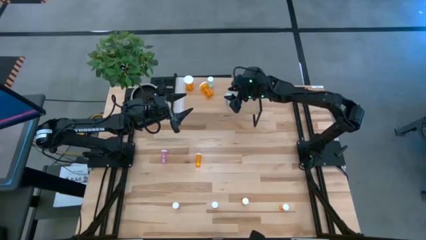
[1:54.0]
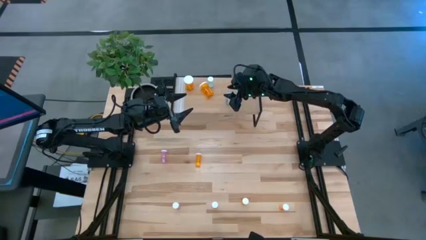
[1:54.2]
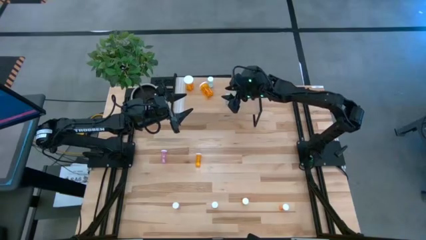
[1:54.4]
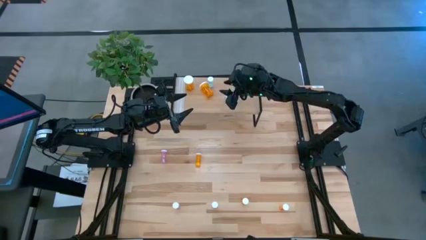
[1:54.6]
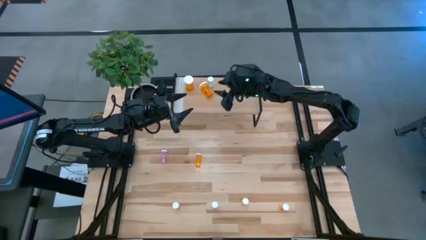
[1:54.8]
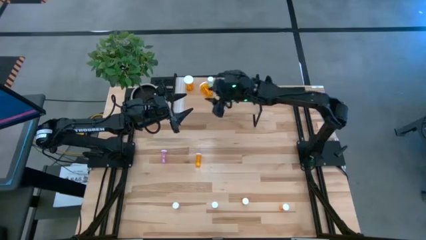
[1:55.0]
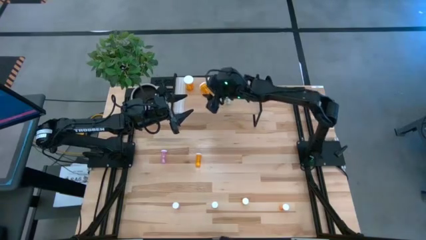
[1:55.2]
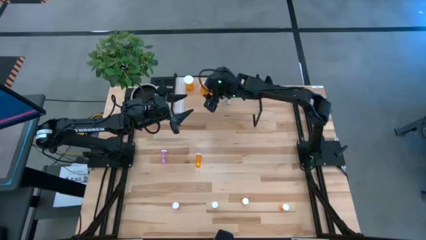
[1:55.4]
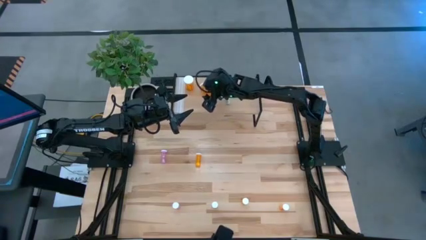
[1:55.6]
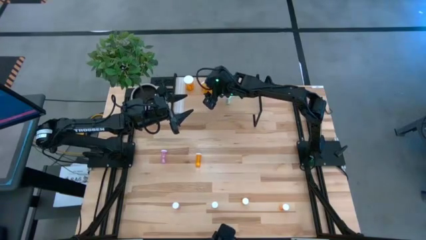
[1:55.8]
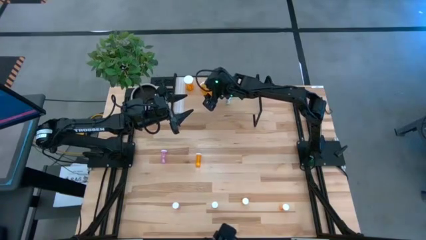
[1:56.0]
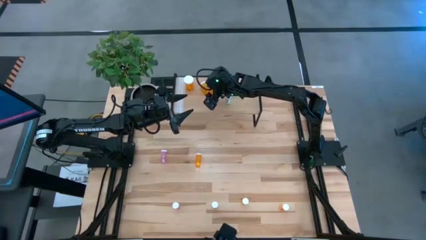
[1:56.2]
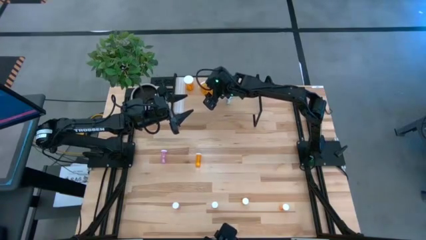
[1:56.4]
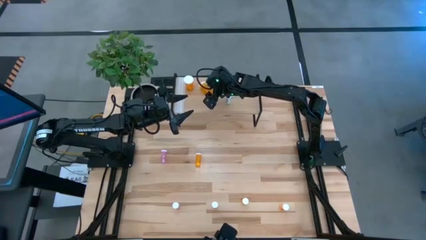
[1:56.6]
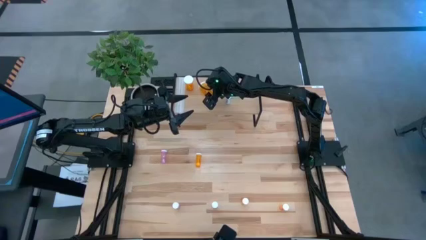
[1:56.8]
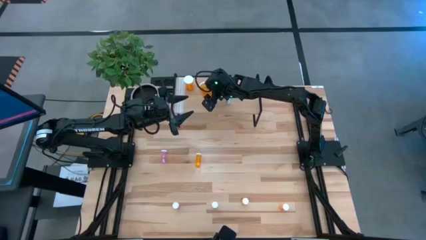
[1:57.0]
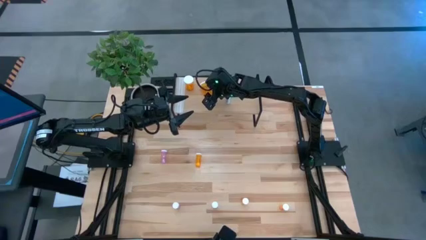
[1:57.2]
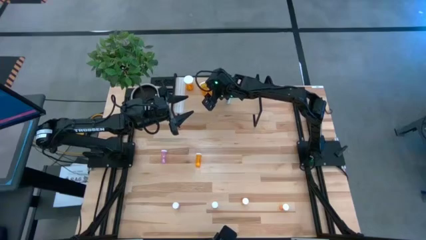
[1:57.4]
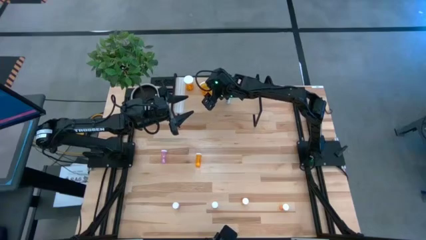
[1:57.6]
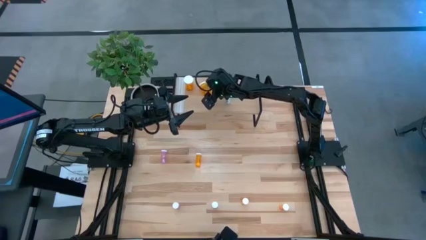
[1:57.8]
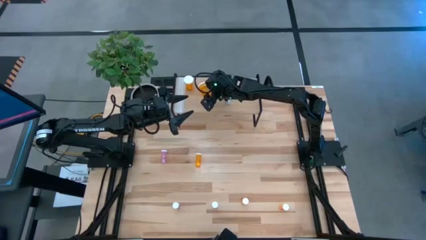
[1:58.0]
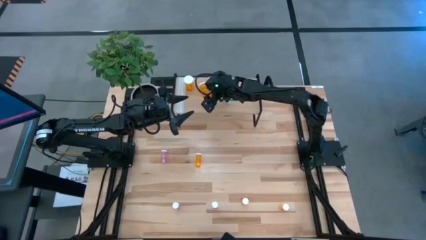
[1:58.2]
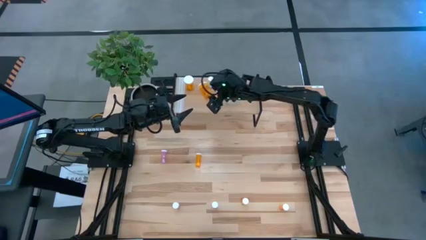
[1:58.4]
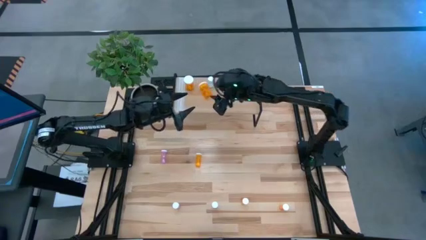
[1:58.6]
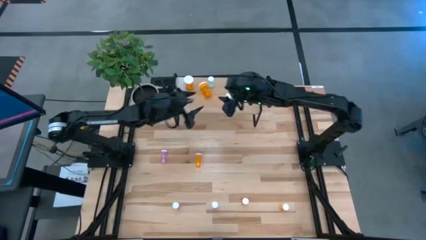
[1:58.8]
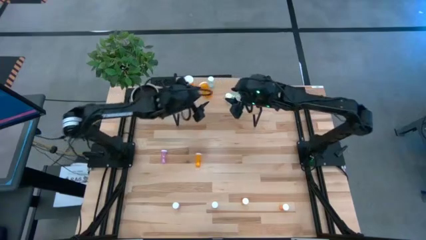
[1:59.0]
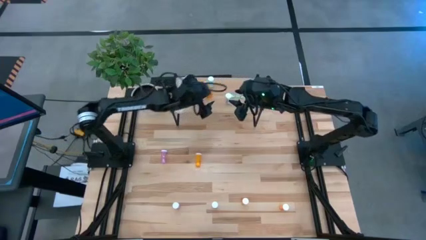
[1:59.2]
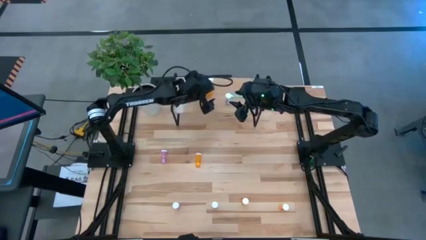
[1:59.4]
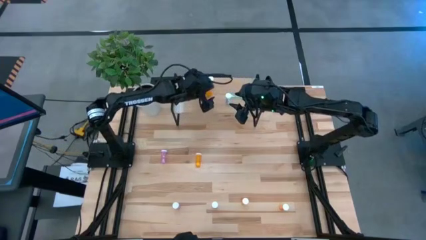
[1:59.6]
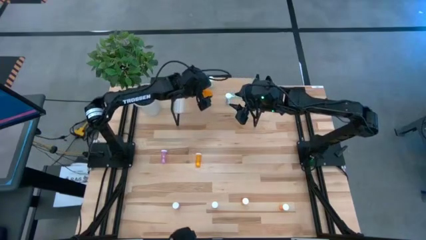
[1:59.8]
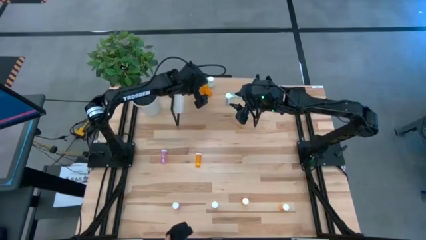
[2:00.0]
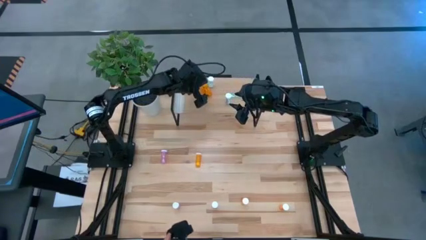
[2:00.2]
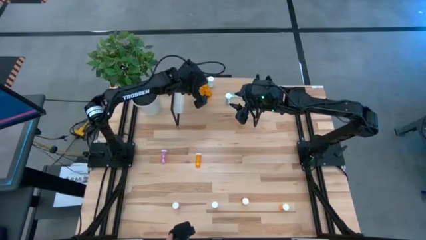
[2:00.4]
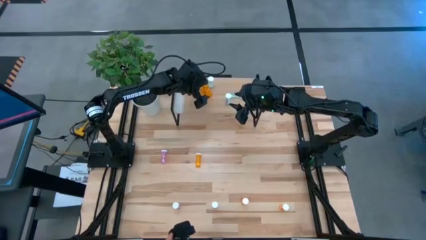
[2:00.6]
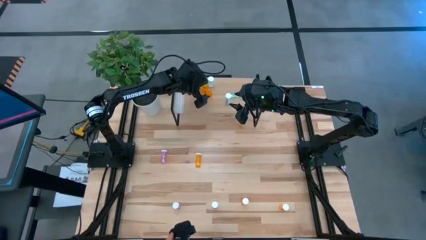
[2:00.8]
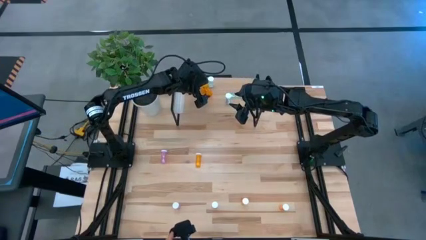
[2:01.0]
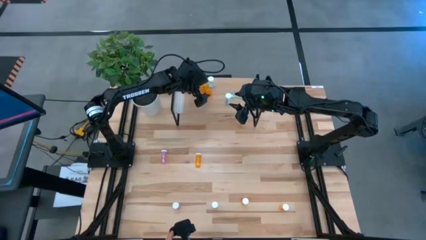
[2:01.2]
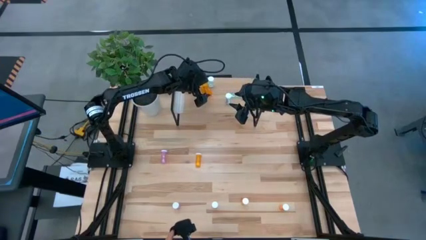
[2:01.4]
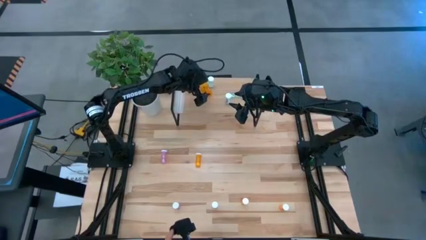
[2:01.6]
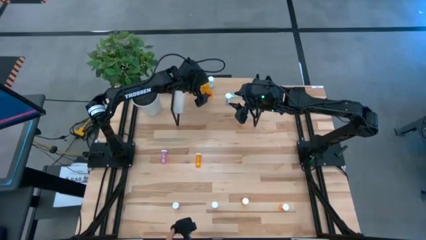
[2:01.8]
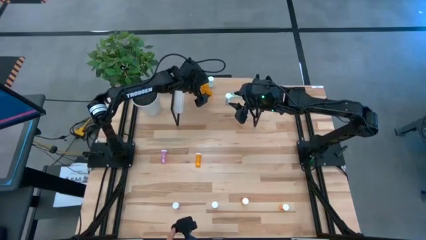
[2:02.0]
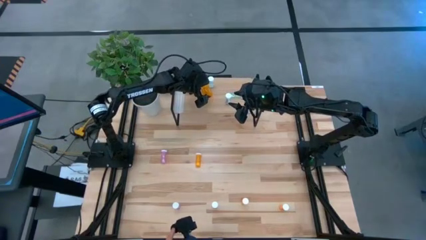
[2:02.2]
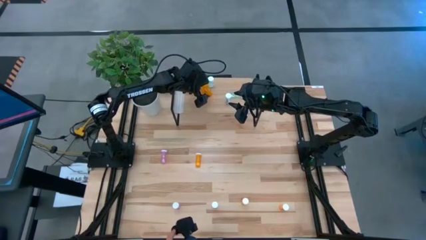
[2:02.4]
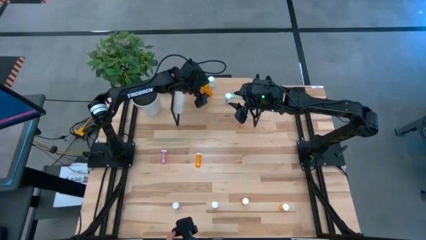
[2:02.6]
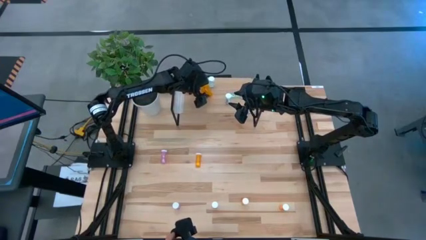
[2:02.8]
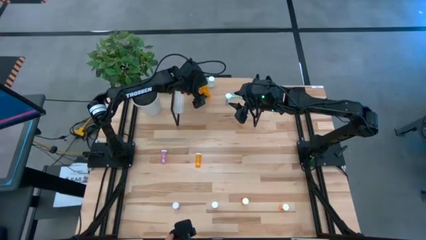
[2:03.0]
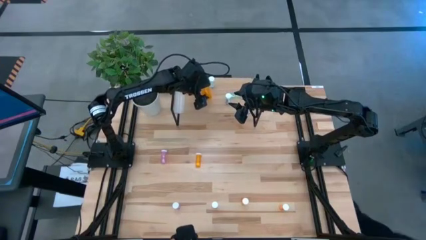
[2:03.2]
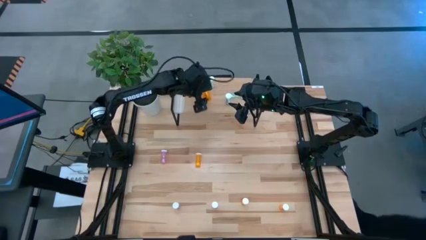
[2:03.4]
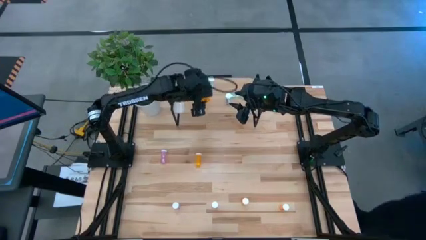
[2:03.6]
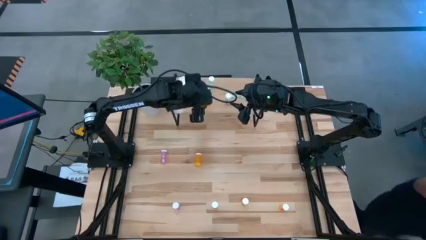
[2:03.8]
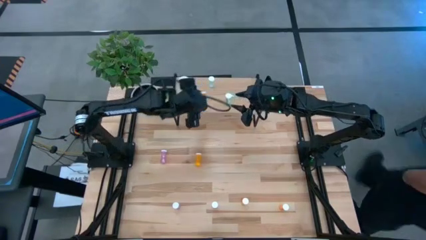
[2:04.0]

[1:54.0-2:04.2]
Task: Pick and place medicine bottles onto shelf by color
Adjust the large orange pill bottle on the shelf

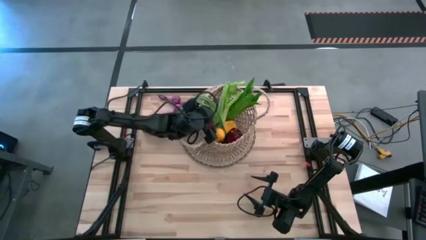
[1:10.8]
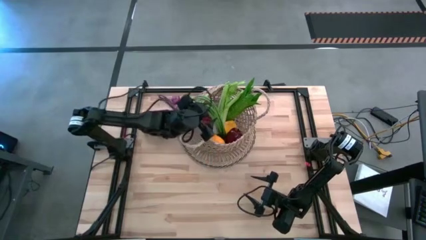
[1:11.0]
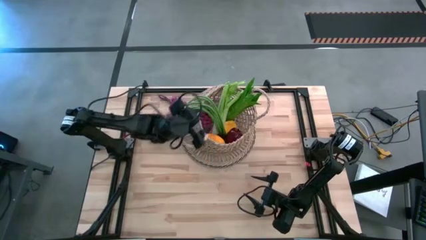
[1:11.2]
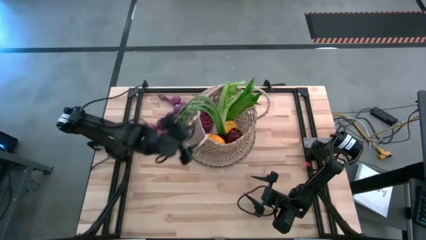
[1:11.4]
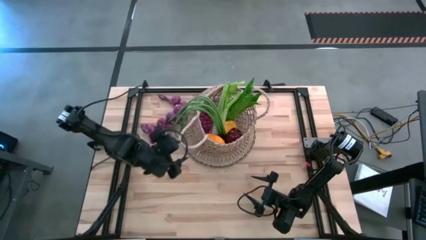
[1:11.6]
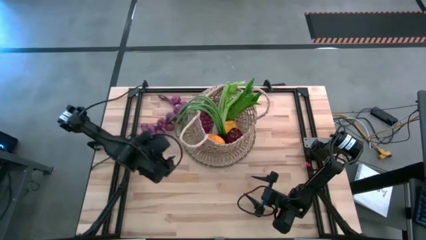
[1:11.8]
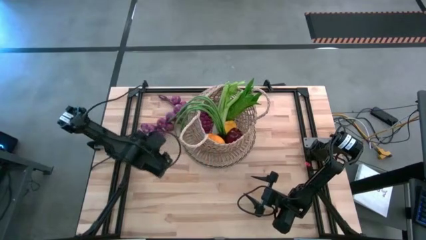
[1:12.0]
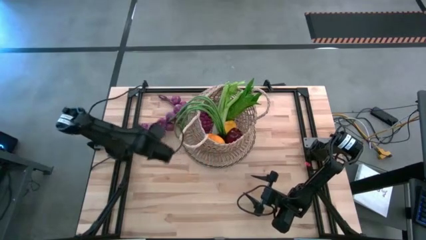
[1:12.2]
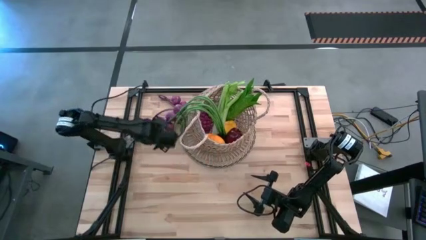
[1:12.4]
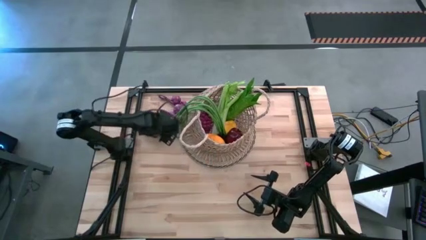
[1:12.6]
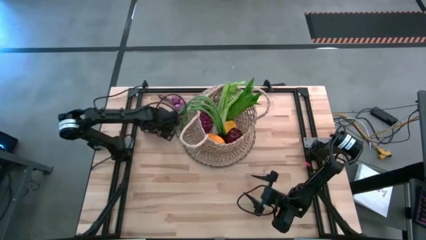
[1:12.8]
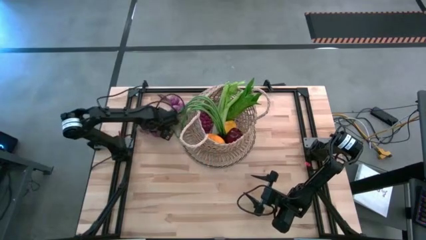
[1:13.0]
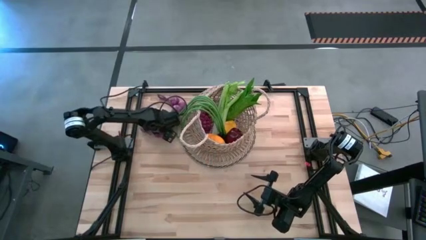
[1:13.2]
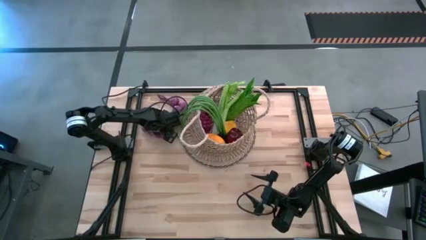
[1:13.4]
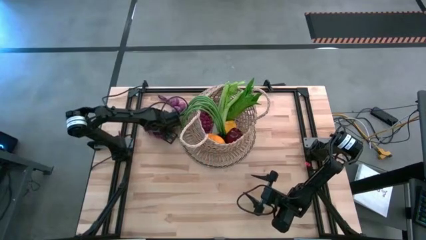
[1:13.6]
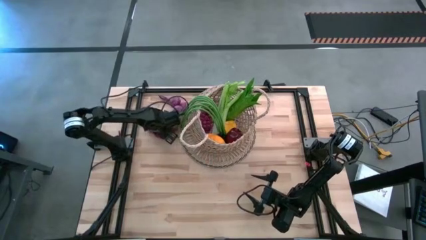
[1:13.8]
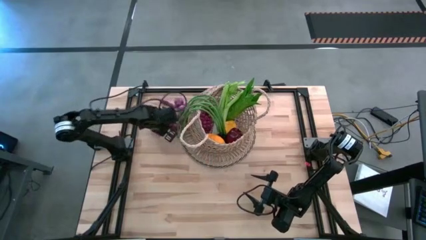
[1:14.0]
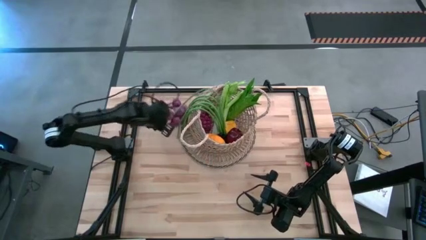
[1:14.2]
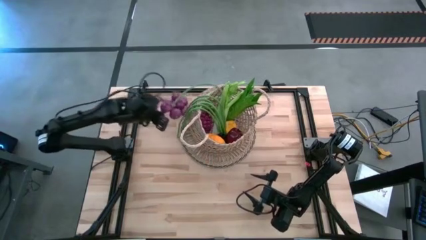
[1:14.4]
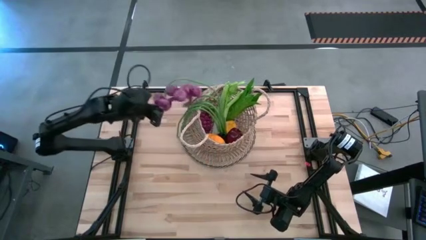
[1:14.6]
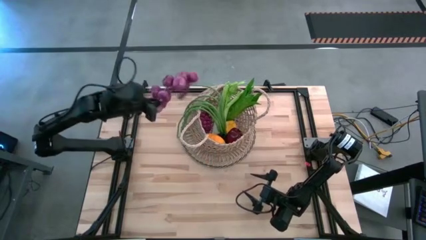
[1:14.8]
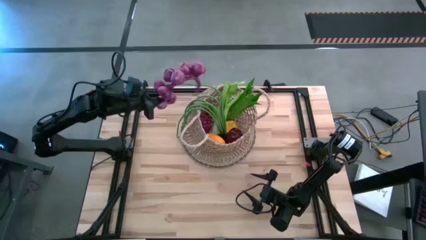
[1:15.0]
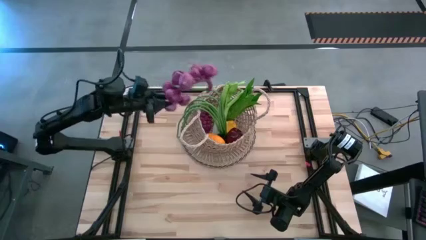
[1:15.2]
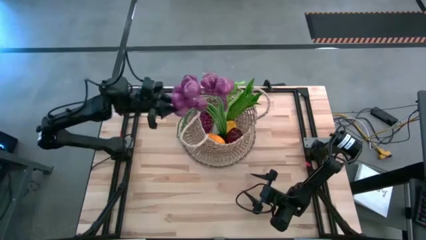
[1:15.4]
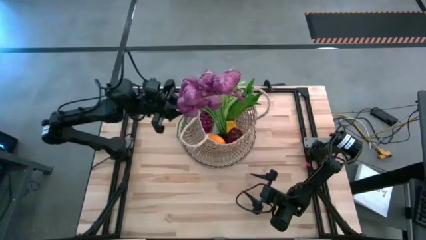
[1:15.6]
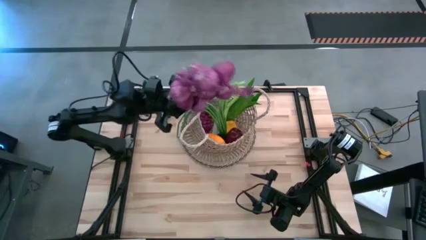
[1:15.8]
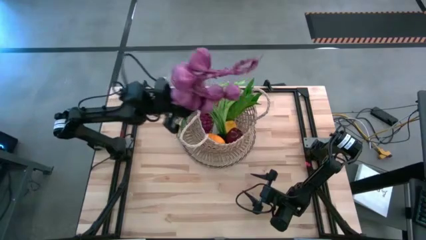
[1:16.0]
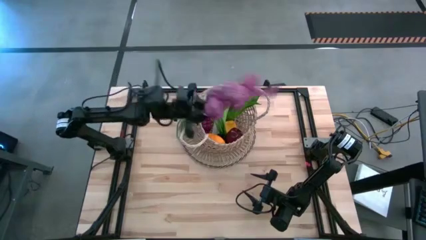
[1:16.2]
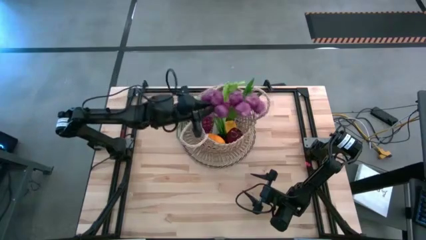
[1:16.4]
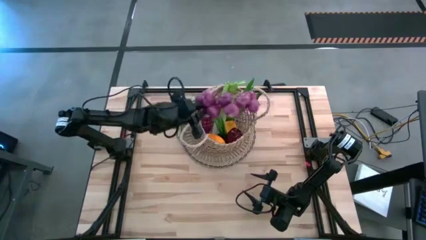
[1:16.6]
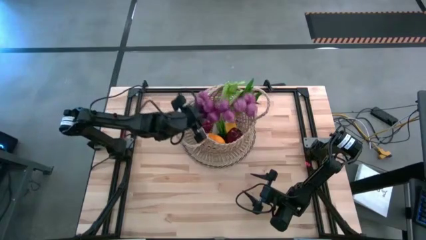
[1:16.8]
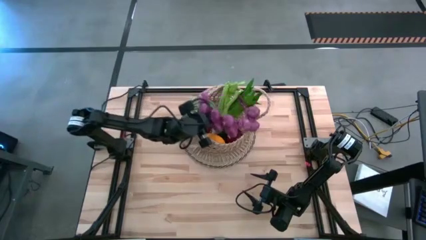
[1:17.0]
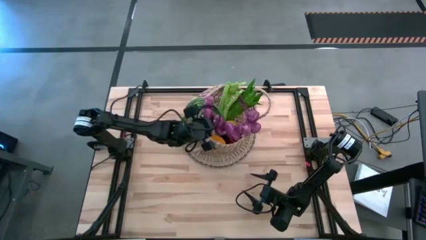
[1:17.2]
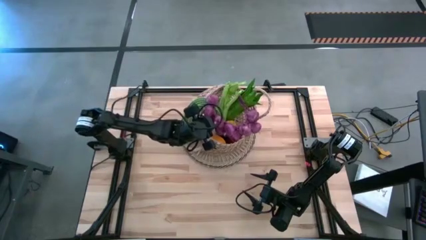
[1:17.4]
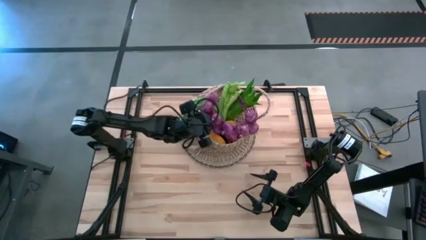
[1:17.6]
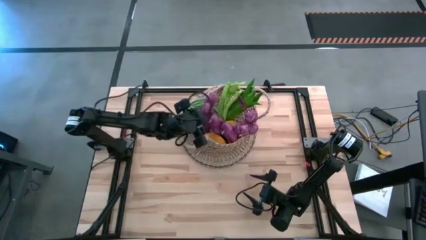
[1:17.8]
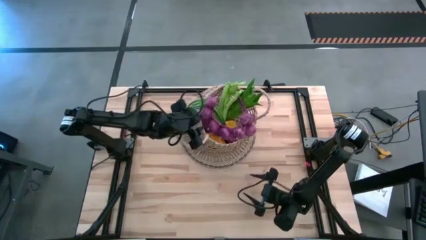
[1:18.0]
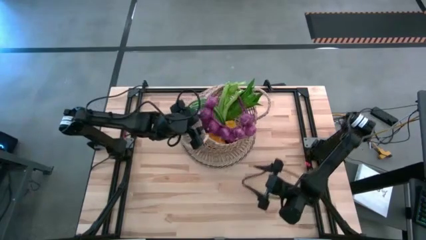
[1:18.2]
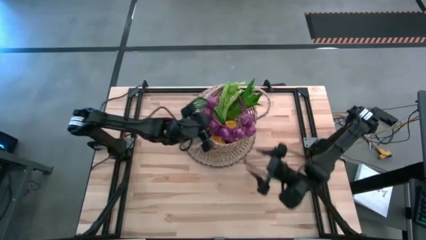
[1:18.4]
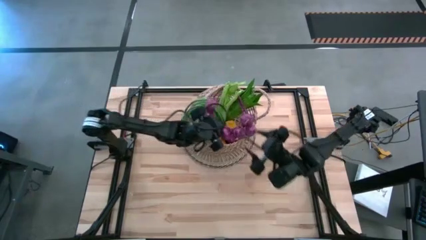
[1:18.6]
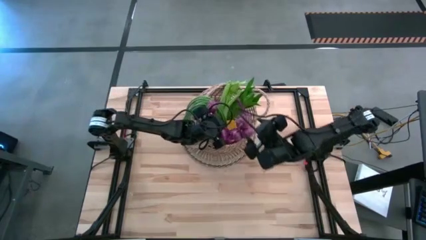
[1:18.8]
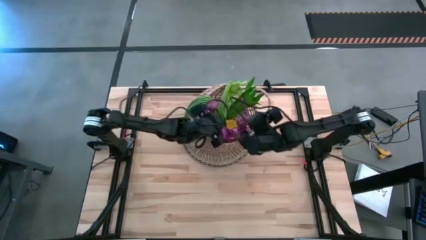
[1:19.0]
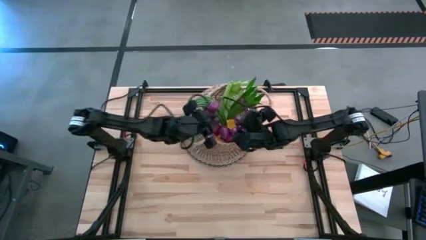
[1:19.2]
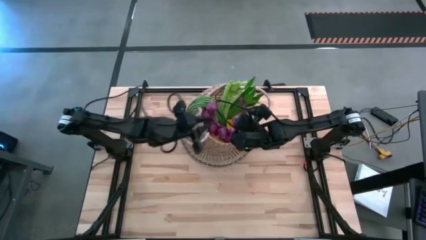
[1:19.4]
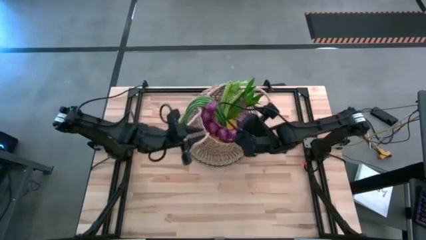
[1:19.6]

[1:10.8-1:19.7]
Task: Build produce basket
Put the purple garlic into the basket
